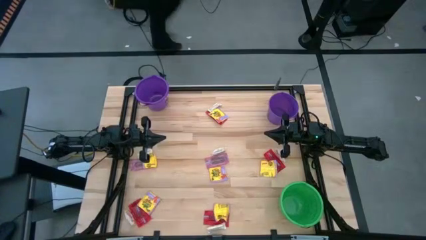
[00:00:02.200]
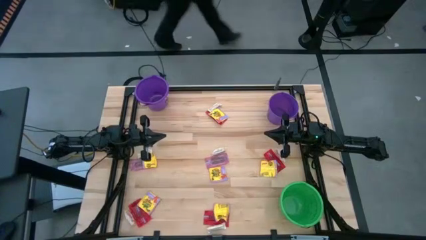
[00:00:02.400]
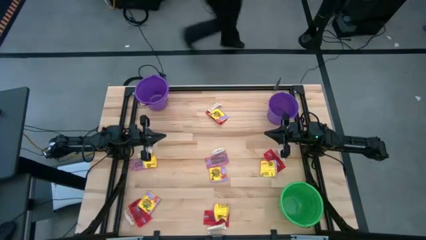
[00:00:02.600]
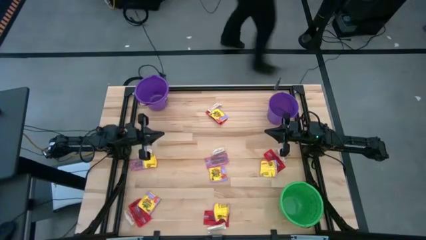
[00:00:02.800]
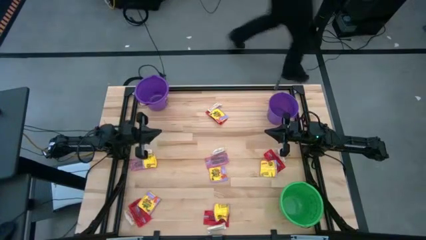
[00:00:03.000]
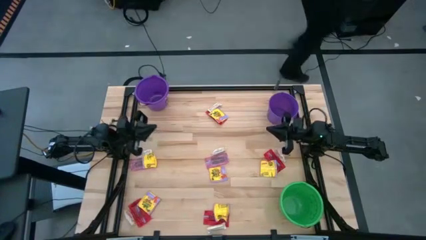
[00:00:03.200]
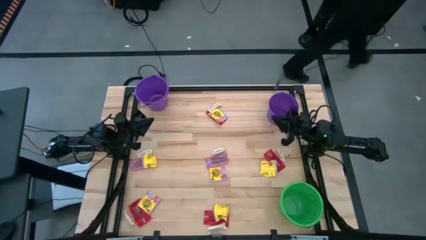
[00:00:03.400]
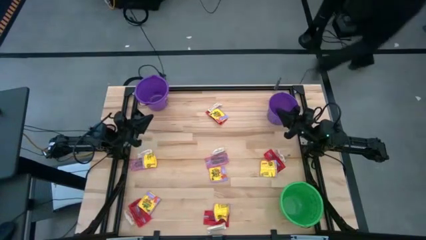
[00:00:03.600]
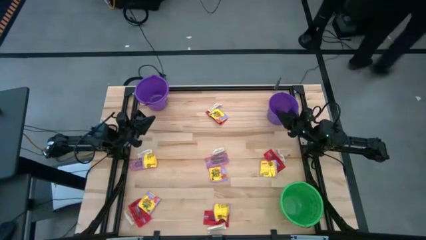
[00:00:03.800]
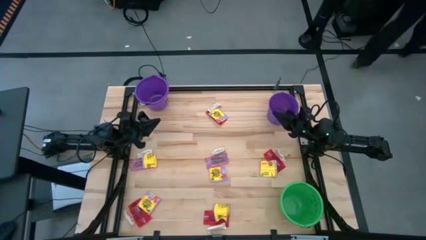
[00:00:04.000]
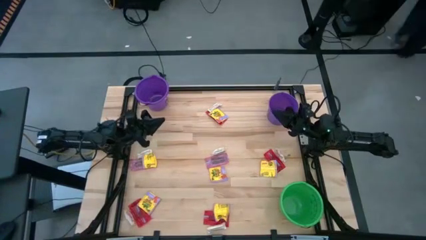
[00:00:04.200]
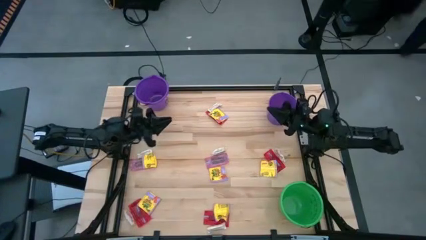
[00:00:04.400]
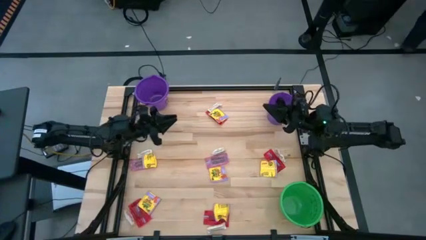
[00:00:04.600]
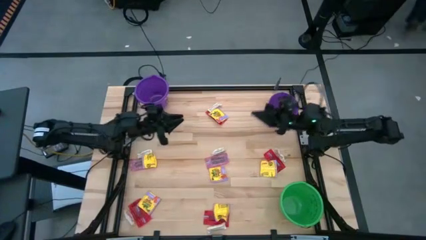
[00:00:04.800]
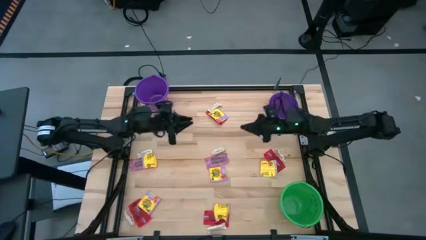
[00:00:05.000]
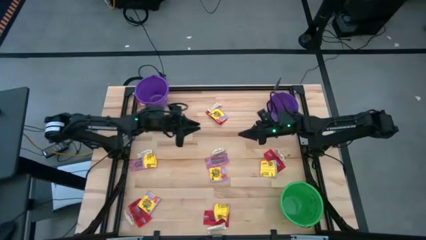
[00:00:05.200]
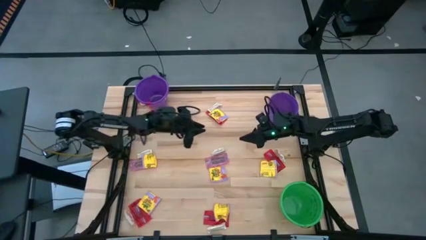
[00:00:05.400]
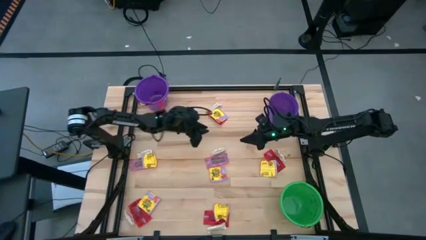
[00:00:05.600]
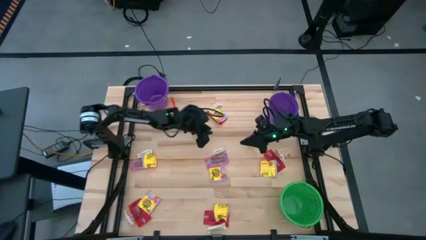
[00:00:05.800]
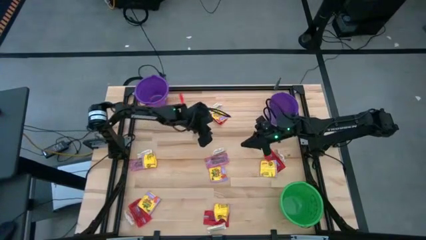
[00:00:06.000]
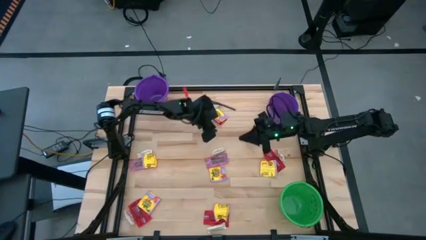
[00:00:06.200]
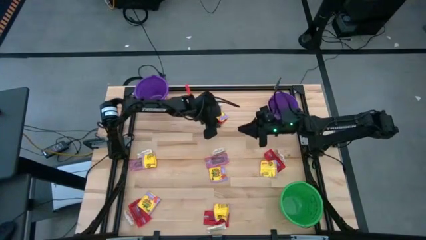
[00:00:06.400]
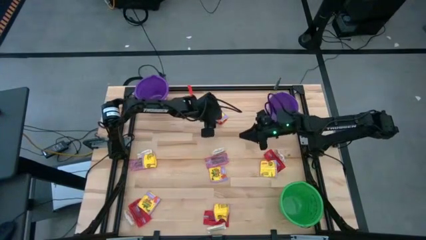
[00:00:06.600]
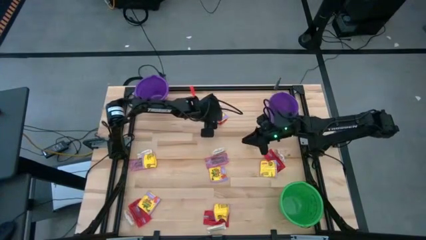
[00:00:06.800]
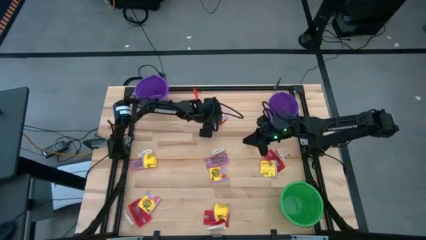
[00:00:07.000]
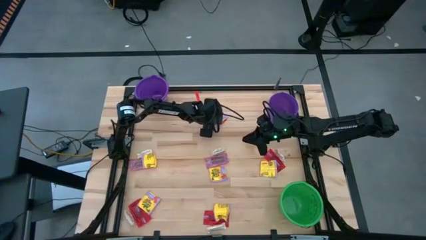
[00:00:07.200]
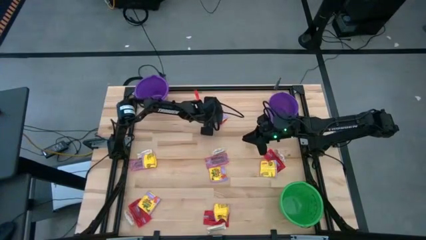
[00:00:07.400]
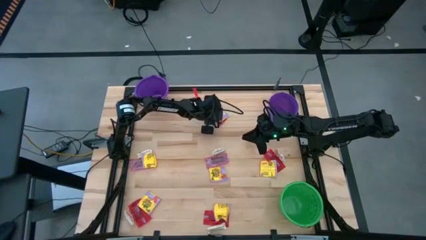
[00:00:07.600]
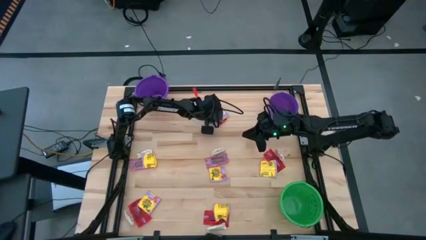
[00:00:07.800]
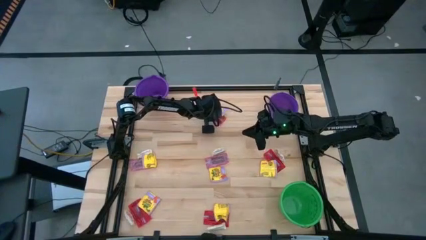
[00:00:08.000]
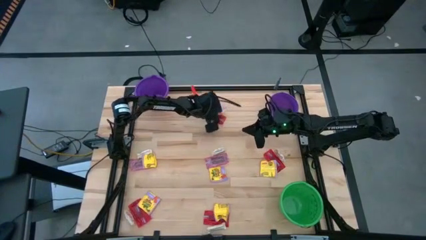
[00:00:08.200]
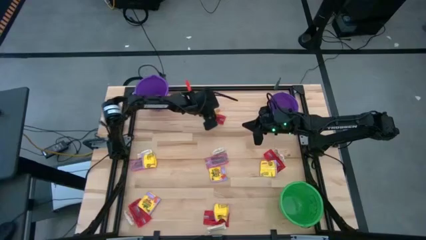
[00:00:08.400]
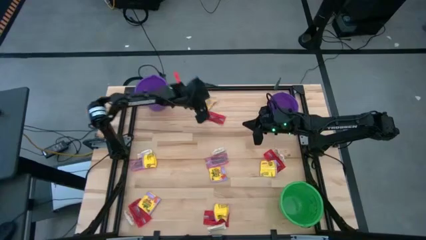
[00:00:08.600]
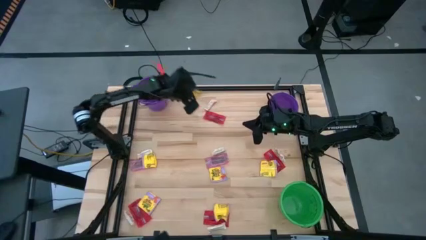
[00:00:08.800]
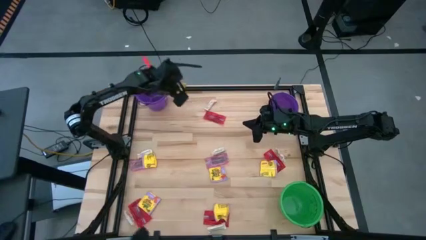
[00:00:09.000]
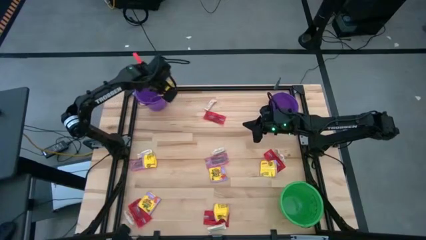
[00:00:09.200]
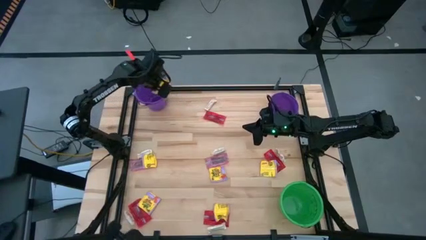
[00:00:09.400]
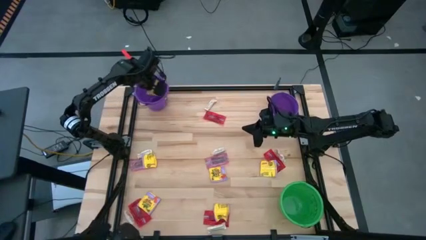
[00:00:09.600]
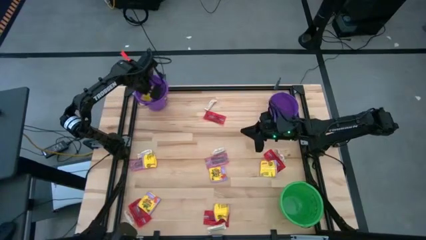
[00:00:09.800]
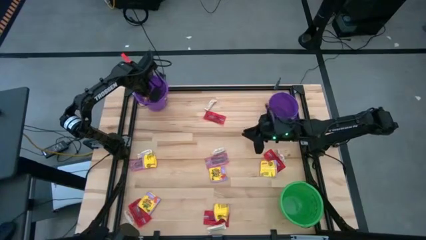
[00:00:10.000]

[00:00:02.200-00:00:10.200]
Task: Sort candy by brand, put in halloween buckets
Put the yellow candy into the left purple bucket

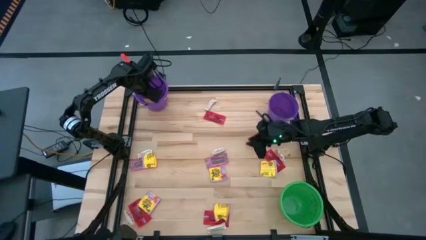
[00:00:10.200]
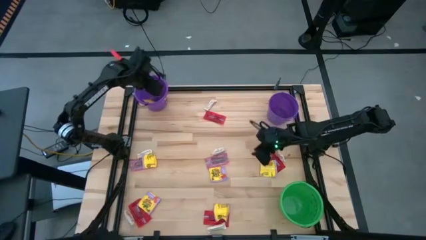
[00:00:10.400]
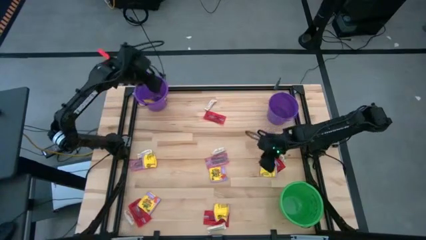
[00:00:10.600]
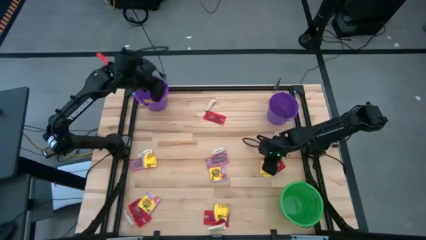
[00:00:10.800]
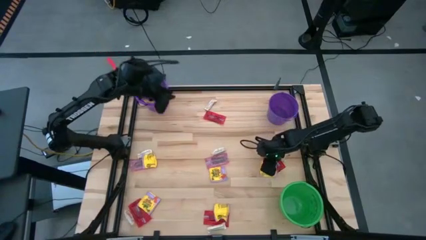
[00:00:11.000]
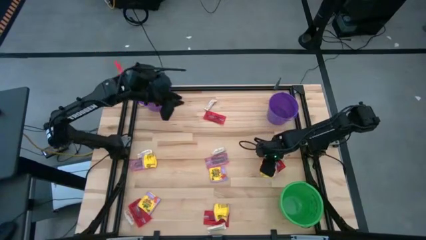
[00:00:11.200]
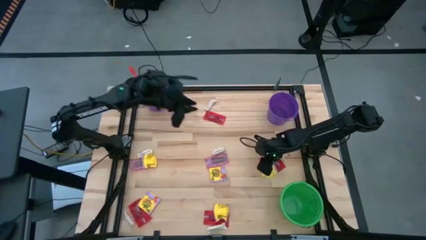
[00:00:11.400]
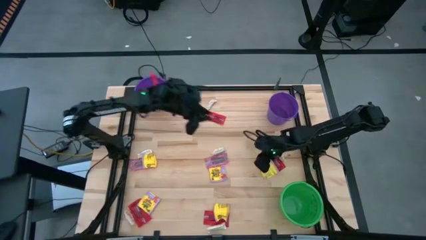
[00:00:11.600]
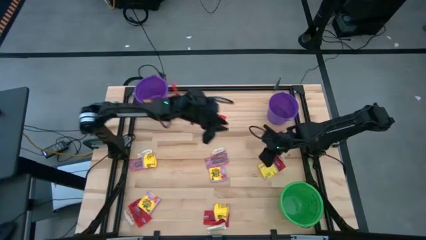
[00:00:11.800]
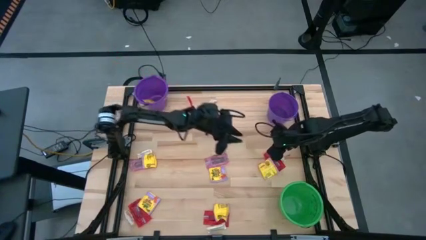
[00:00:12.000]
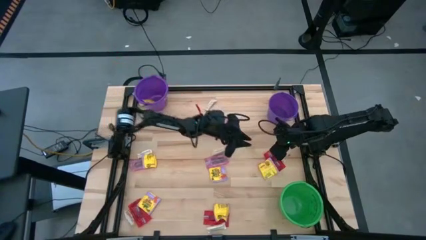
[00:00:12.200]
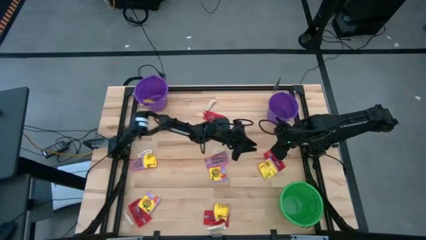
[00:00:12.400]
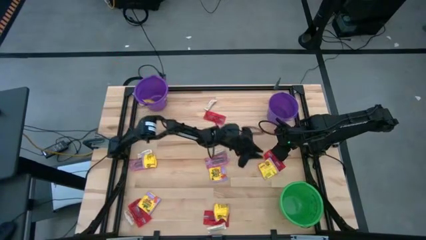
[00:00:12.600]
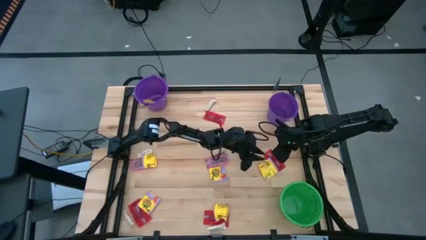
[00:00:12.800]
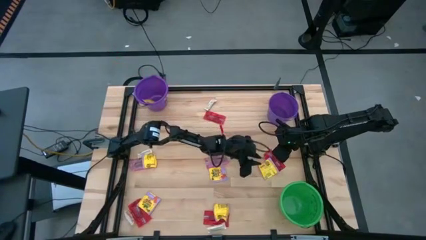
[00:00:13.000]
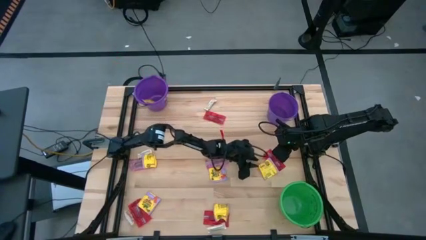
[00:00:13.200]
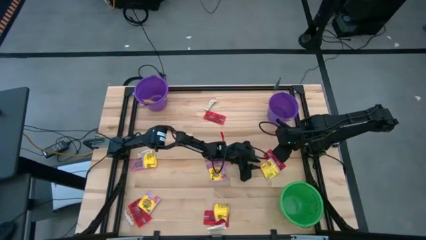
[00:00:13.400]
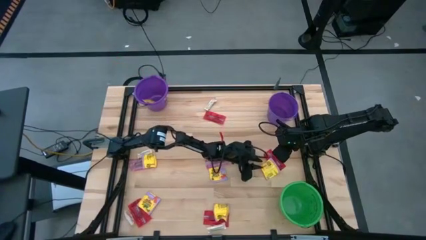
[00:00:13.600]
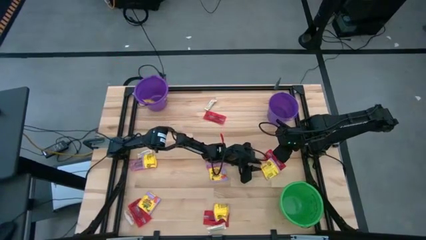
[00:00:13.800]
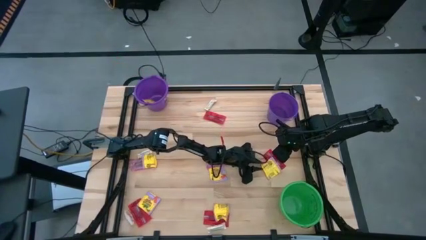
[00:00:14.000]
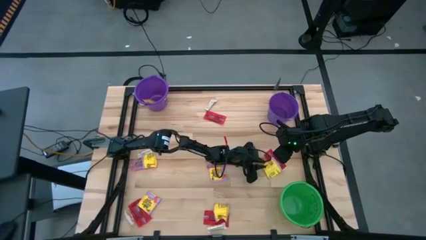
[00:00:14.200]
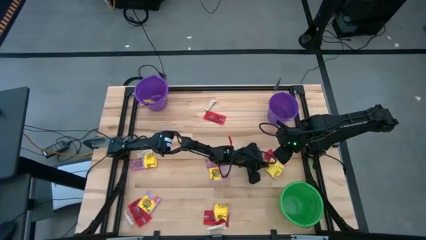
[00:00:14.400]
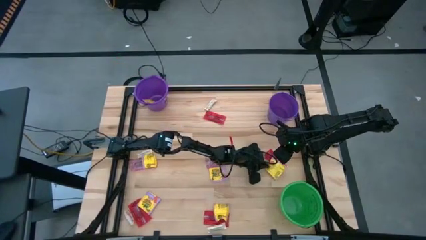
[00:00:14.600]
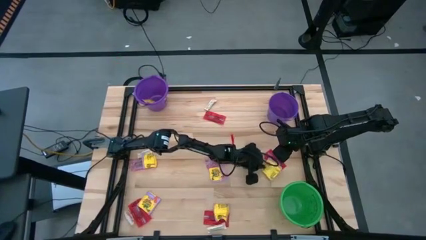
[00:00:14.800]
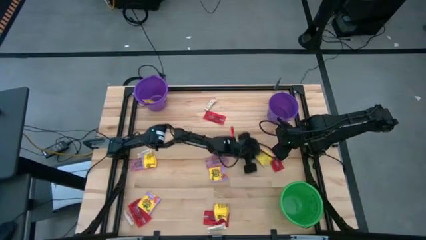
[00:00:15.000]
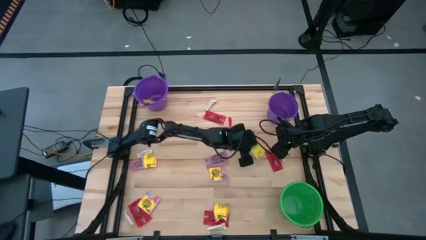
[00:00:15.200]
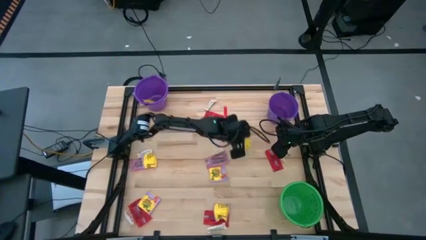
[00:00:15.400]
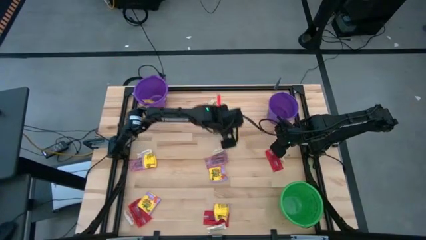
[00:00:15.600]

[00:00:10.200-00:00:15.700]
Put the yellow candy into the left purple bucket

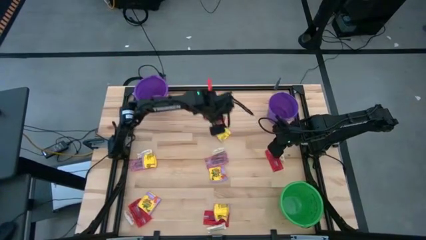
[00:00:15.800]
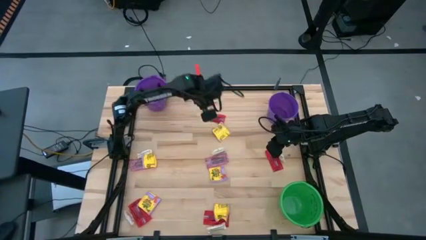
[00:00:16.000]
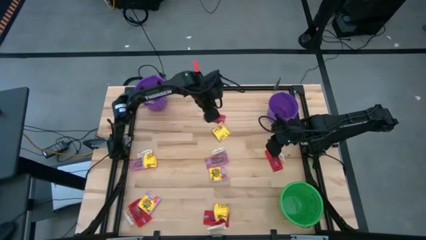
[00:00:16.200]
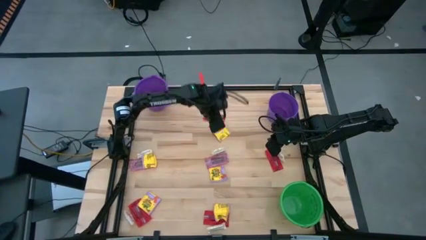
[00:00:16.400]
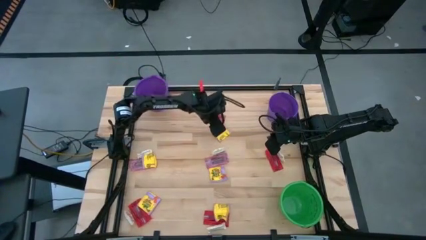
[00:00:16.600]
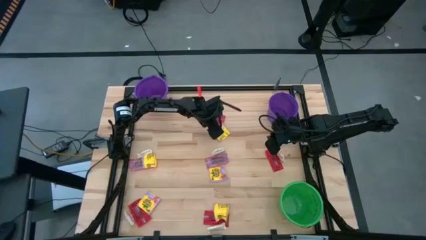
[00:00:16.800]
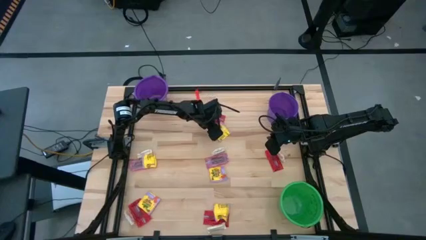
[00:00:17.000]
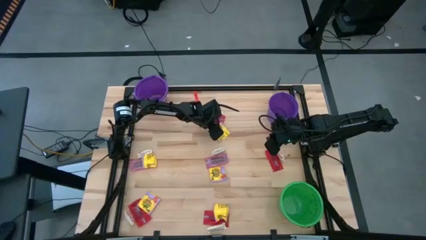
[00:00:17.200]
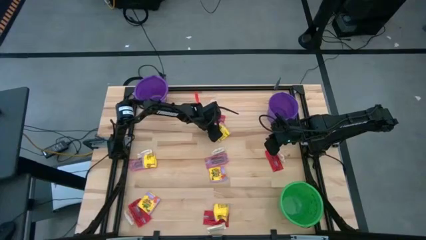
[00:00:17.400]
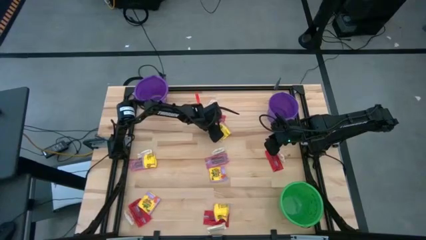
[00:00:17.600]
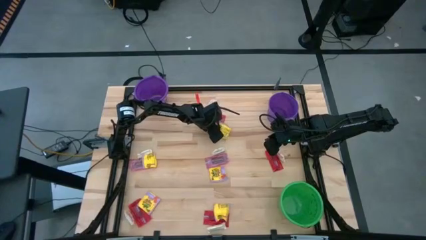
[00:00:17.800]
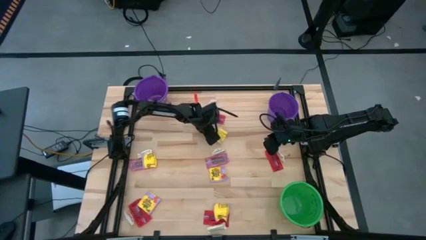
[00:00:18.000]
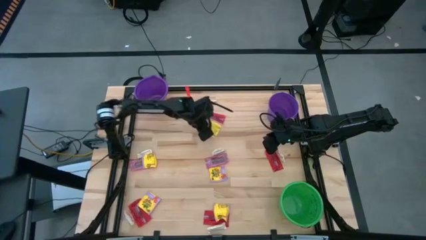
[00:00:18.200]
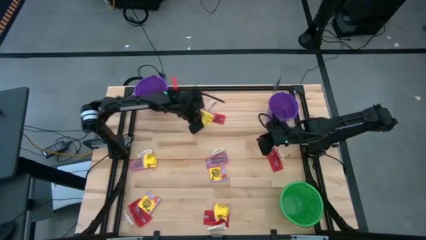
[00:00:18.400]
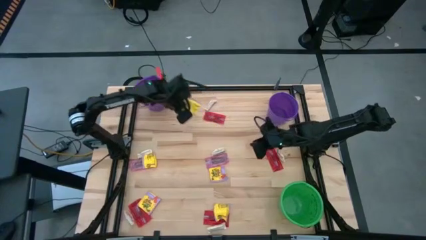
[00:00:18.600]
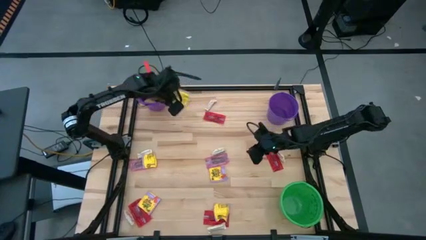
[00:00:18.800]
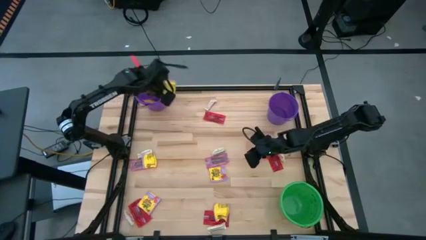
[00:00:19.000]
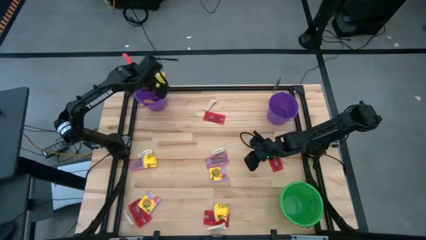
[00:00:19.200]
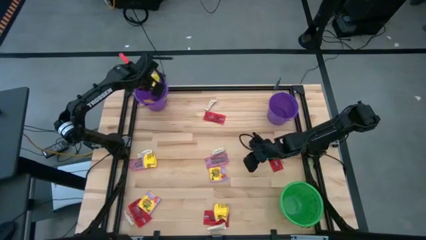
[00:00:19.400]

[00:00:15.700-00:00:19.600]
Put the yellow candy into the left purple bucket
